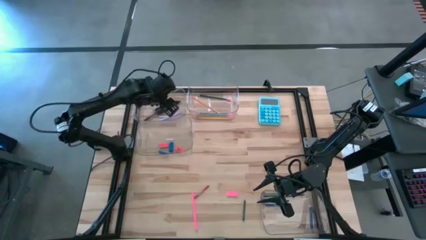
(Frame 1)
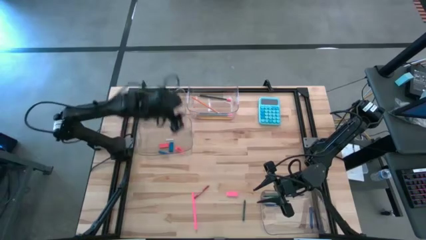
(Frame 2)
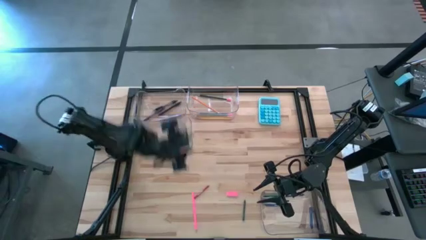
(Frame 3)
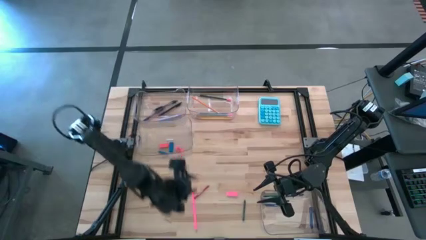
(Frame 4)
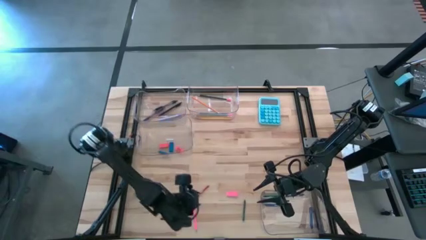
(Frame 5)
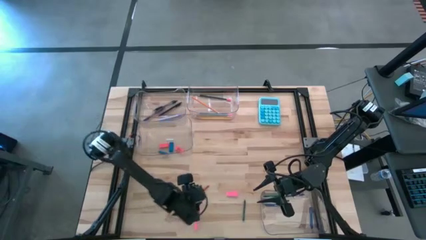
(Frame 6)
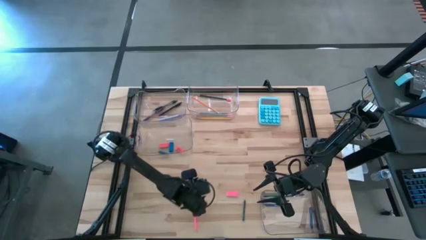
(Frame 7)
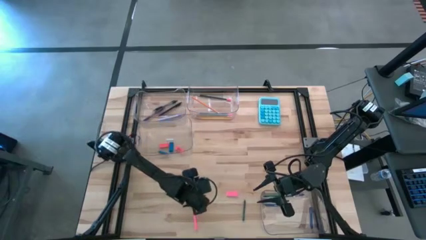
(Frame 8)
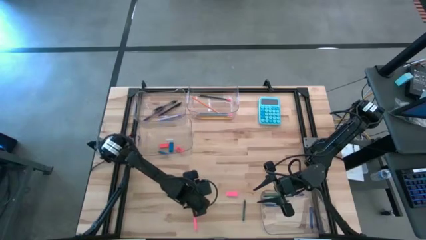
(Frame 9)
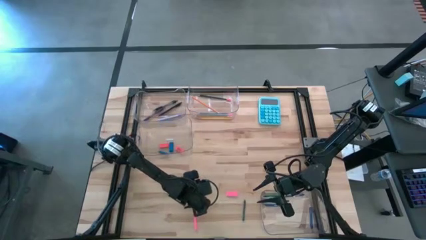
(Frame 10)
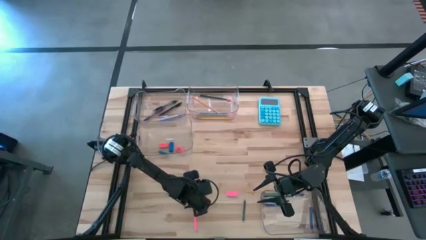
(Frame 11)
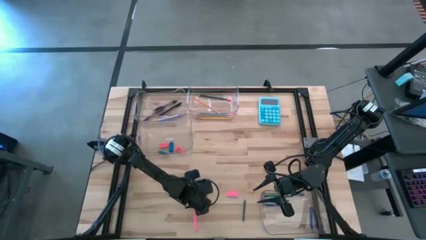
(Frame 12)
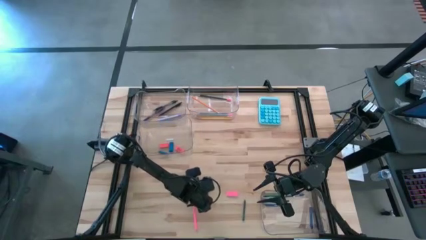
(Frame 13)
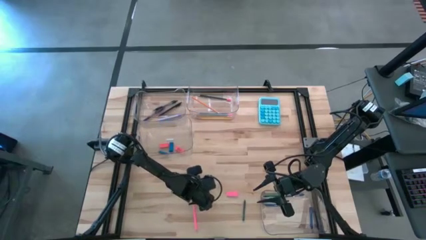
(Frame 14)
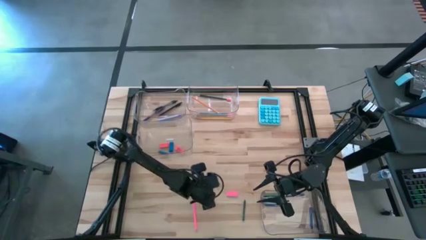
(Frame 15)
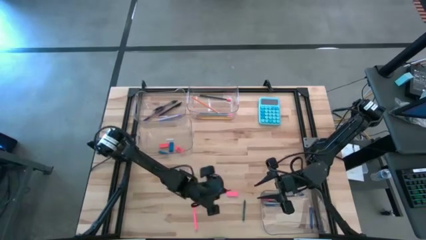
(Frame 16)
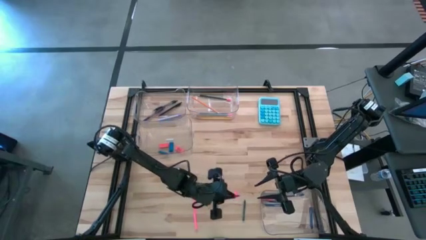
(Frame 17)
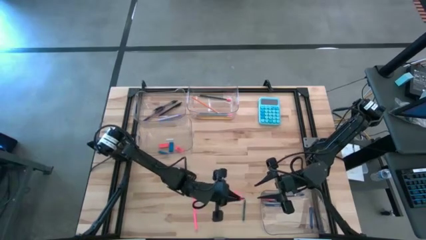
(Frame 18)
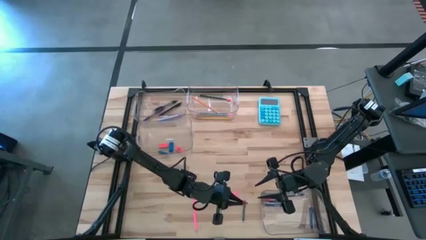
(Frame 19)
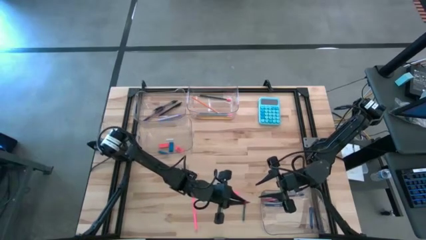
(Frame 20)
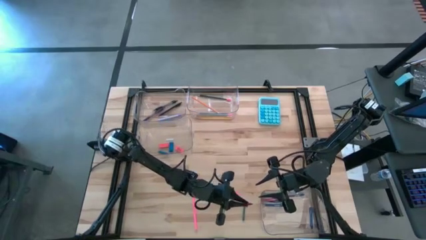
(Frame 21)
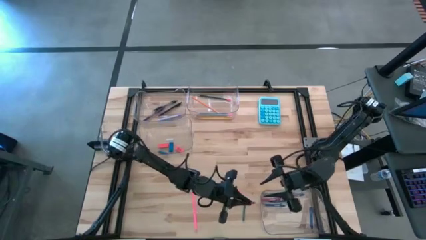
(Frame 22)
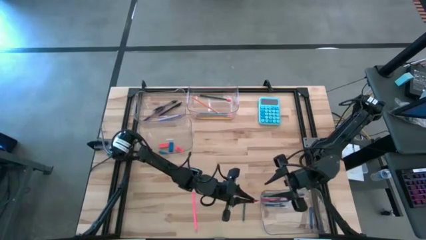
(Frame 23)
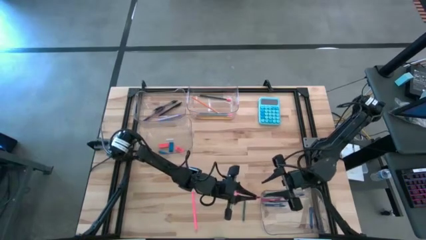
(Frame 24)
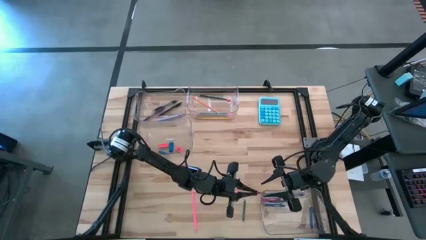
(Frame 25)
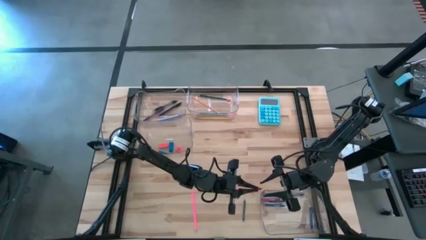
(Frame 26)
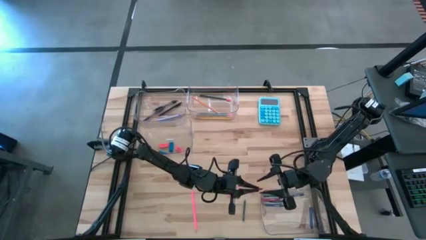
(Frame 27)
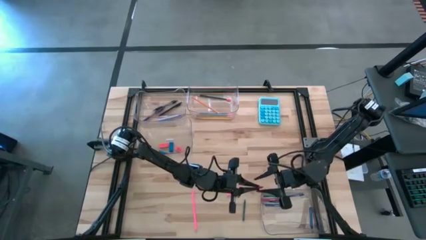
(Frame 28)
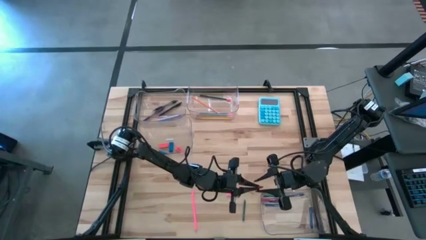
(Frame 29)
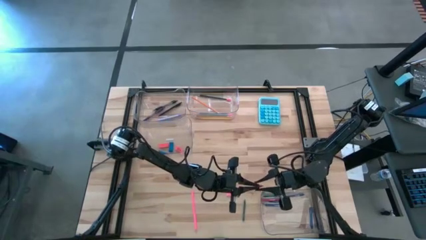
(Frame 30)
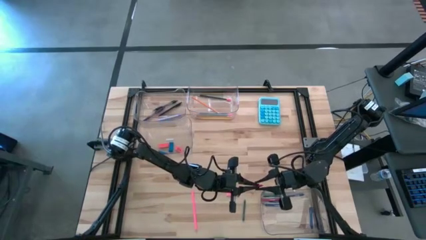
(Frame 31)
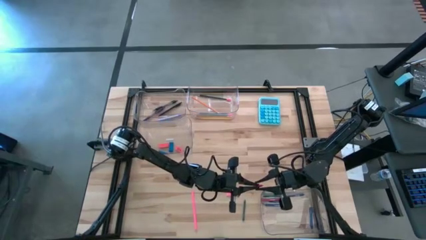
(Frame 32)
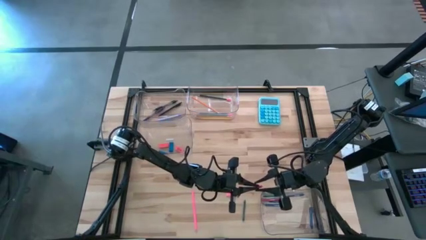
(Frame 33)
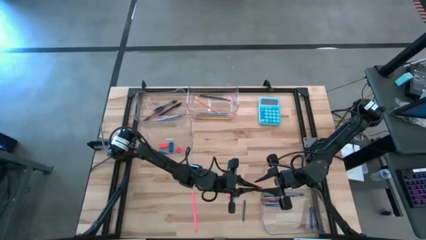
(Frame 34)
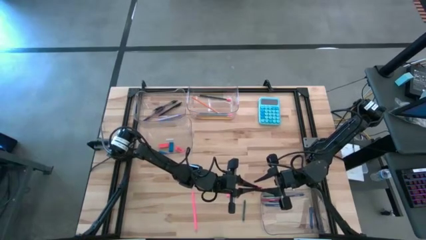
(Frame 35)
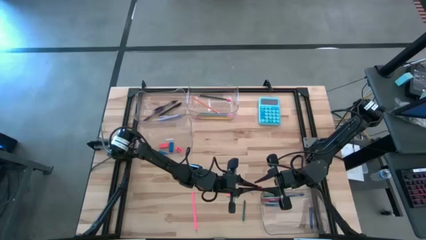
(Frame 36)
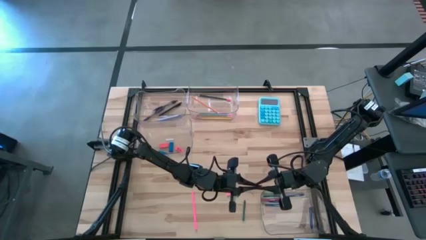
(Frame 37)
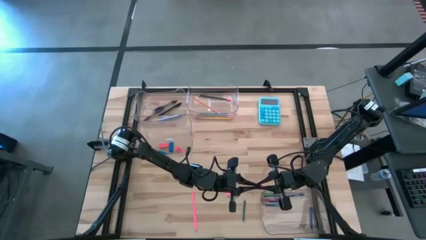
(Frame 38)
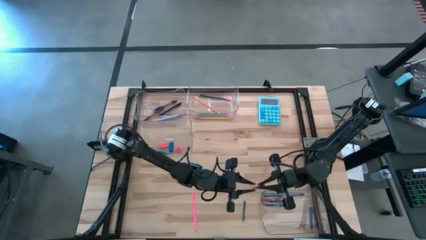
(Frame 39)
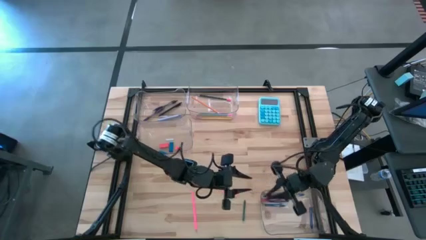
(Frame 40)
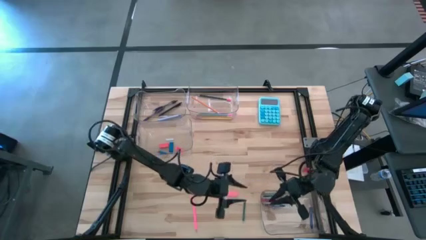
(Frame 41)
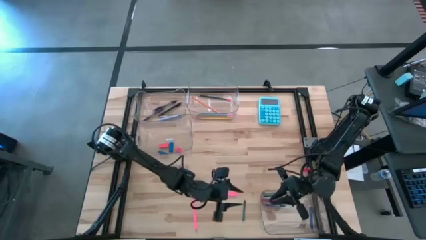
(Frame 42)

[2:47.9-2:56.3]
Task: Sort crayons/erasers/pens/pencils in bins
Put the red crayon into the bottom right transparent bin

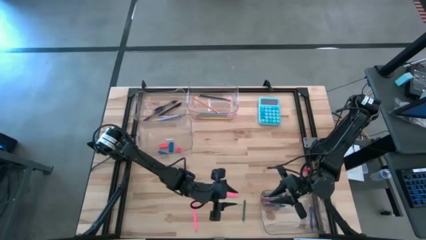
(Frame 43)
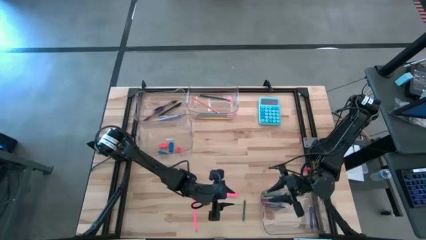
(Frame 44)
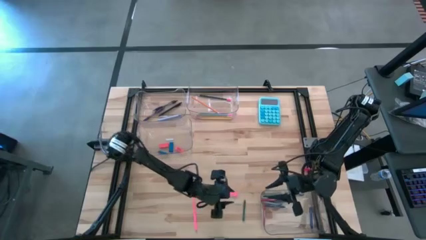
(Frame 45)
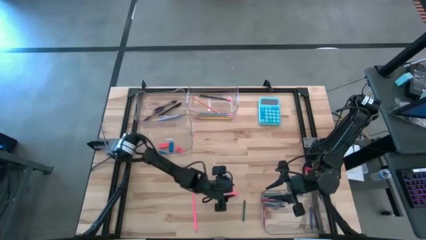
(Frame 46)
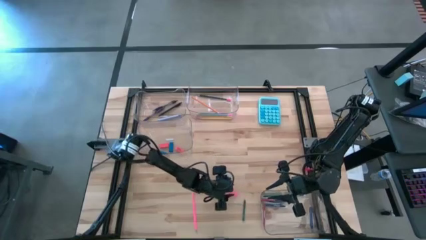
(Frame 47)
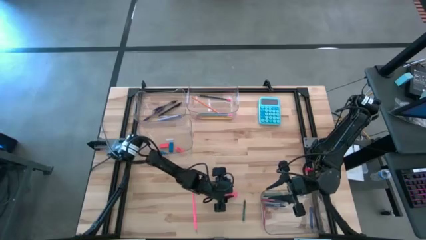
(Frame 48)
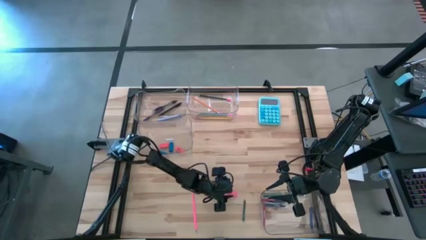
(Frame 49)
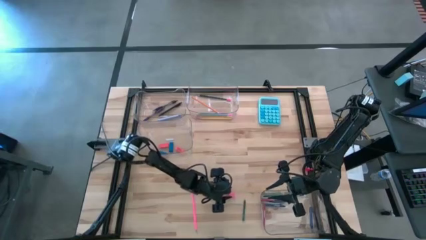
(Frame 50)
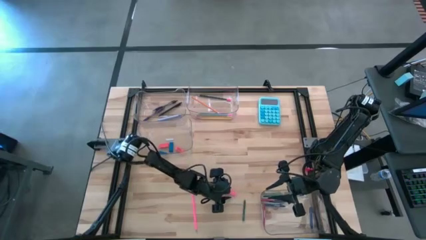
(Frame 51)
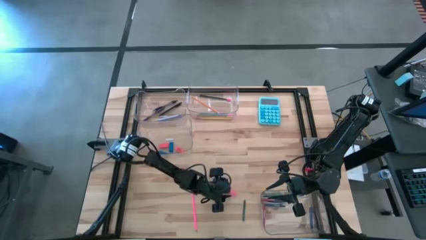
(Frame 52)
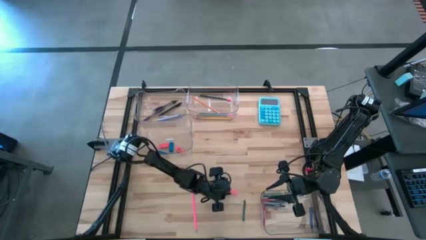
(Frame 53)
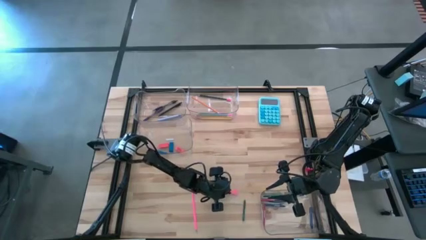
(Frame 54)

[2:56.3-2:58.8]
Put the pink eraser into the middle left transparent bin

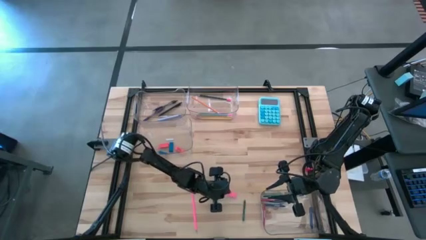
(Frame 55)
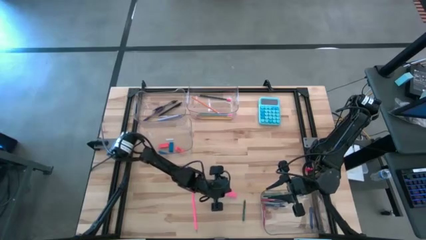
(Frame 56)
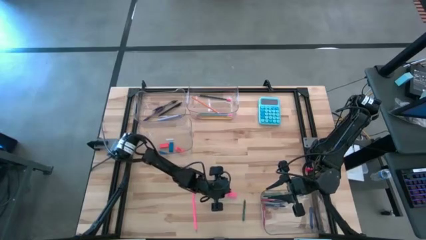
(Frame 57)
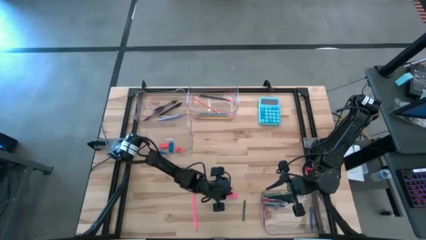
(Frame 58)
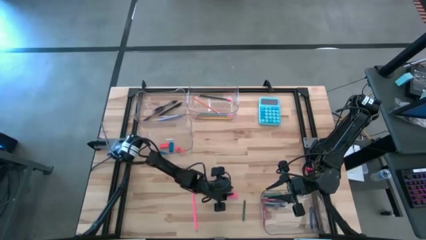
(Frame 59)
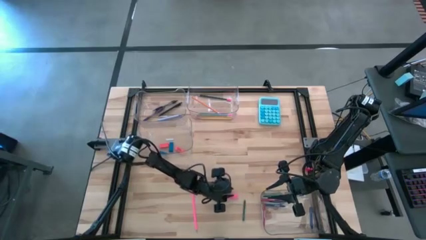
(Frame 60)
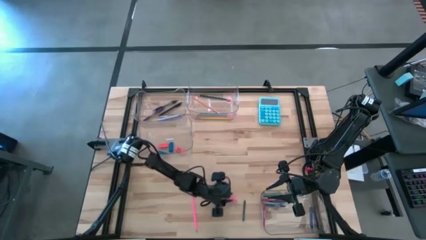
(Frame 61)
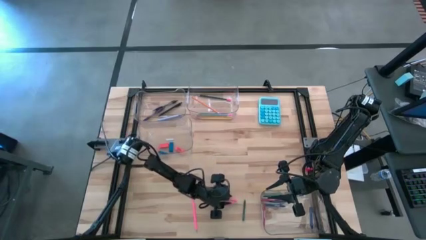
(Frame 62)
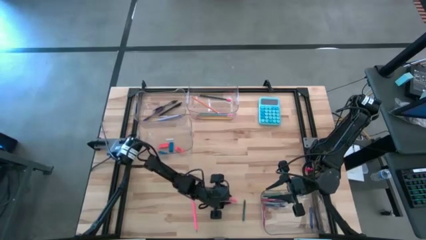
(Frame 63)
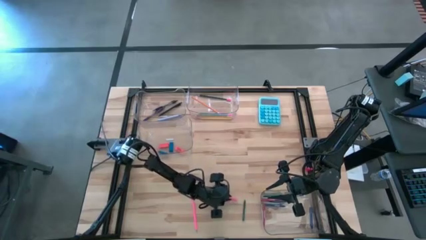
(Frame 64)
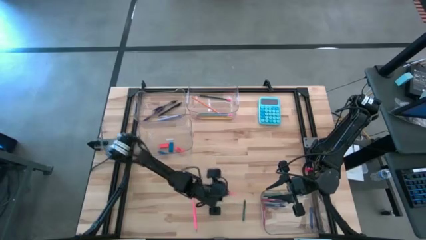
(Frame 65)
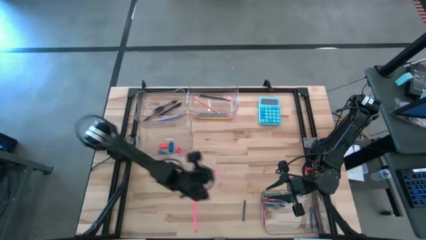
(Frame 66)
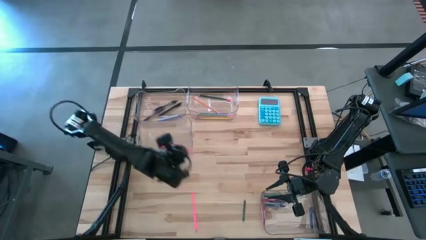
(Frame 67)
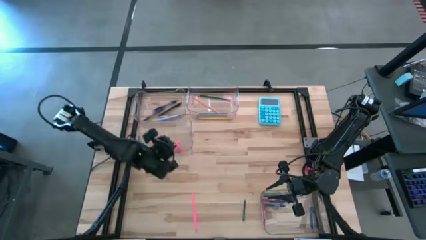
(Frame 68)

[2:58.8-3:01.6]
Put the pink eraser into the middle left transparent bin

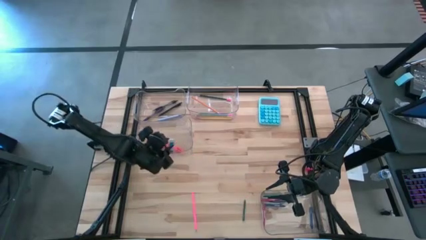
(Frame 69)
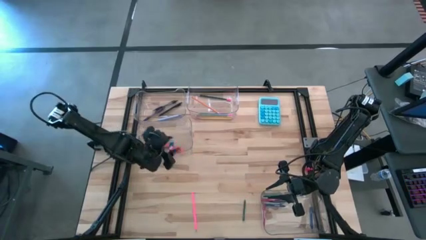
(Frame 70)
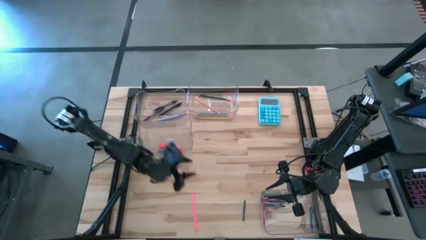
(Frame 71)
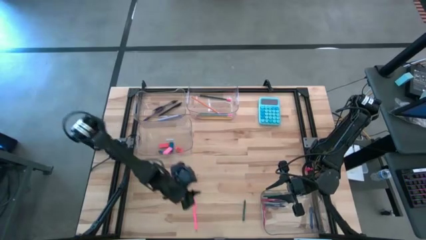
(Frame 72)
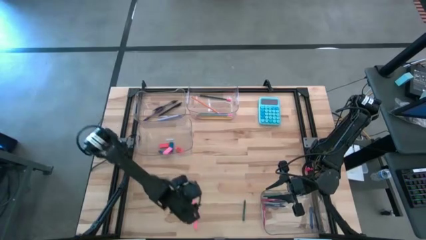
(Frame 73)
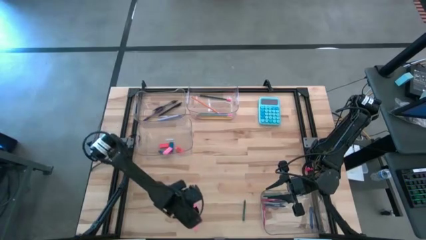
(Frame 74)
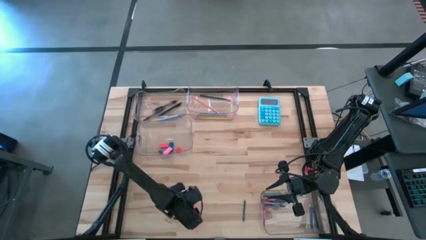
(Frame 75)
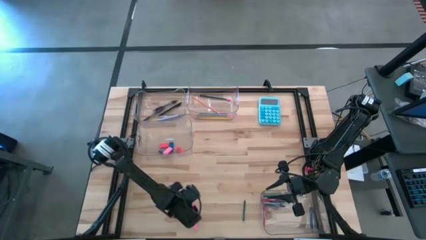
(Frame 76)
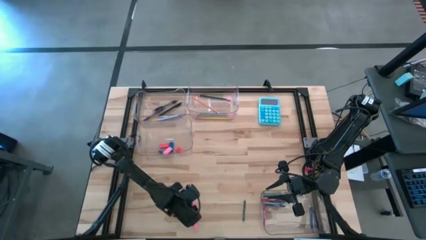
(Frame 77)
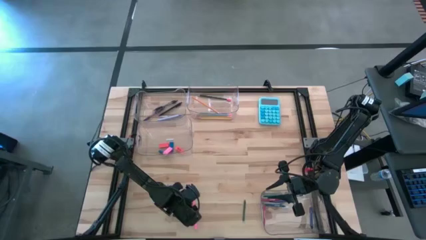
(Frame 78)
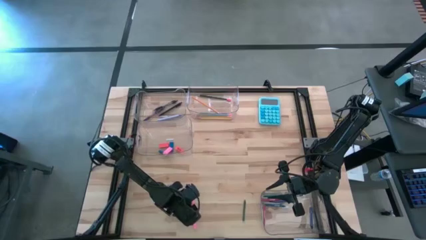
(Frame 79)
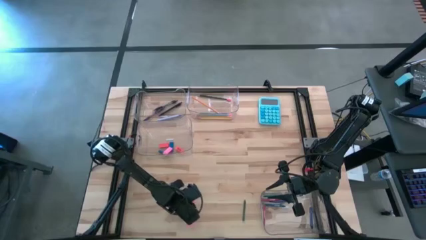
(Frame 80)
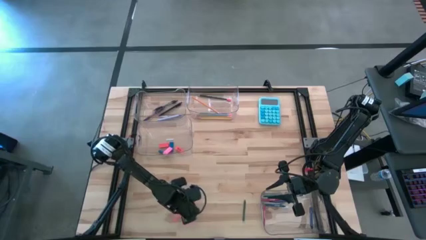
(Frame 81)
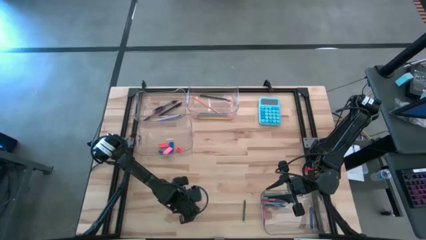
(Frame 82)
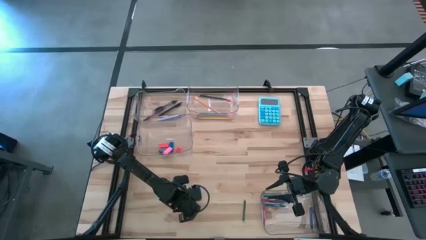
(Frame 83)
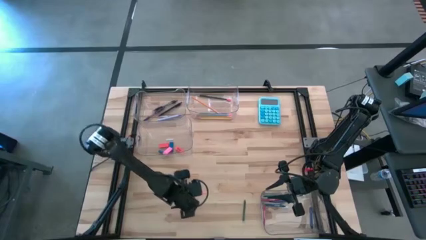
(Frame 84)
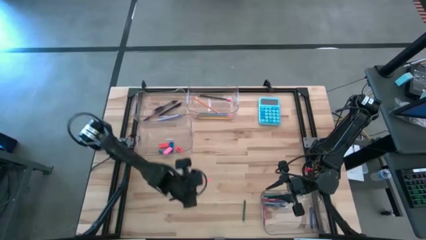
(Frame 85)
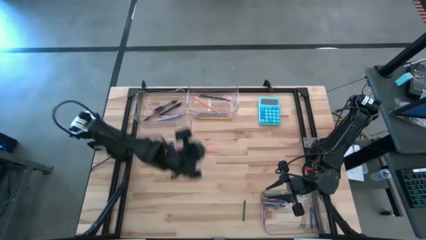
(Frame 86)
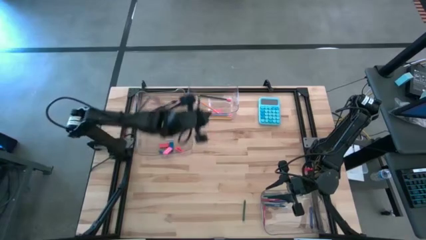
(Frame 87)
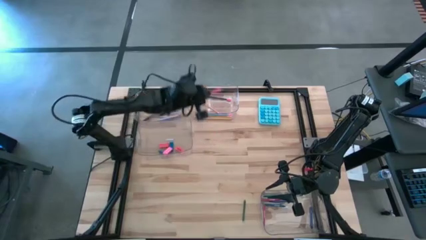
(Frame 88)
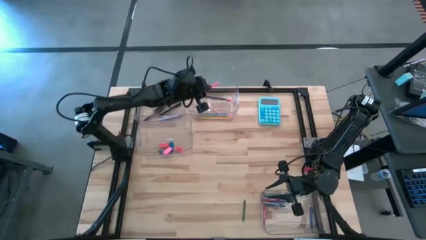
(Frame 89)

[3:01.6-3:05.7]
Put the pink pencil into the top right transparent bin
